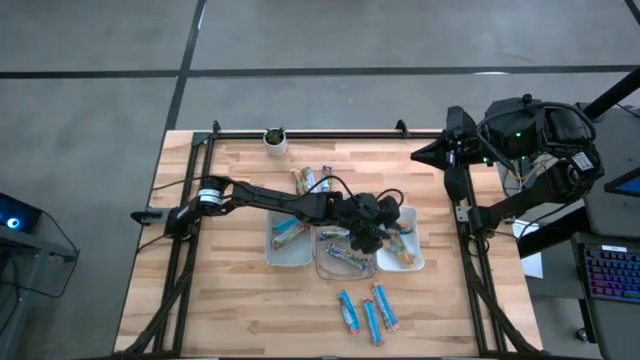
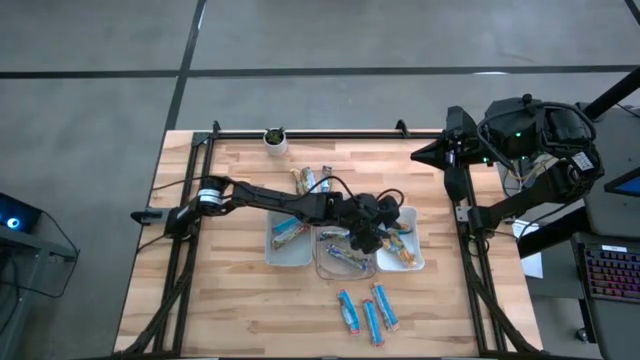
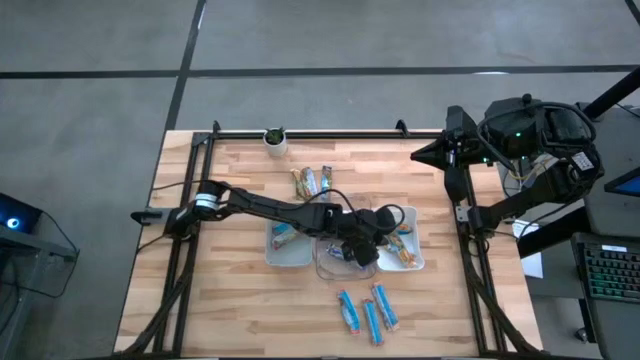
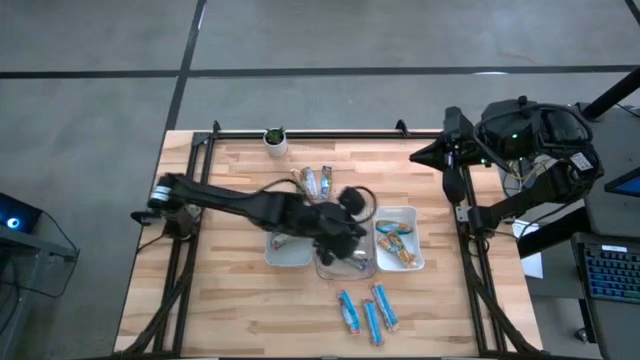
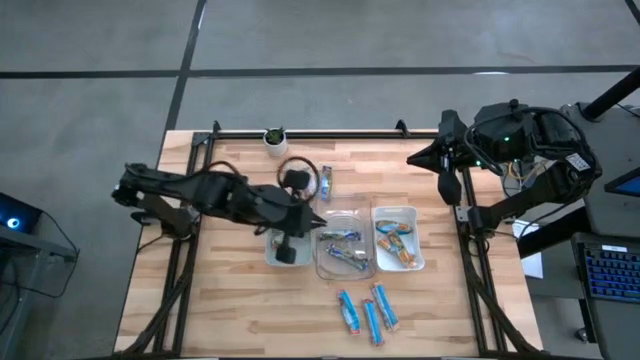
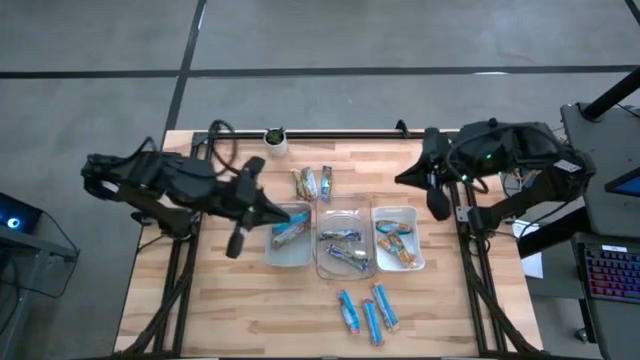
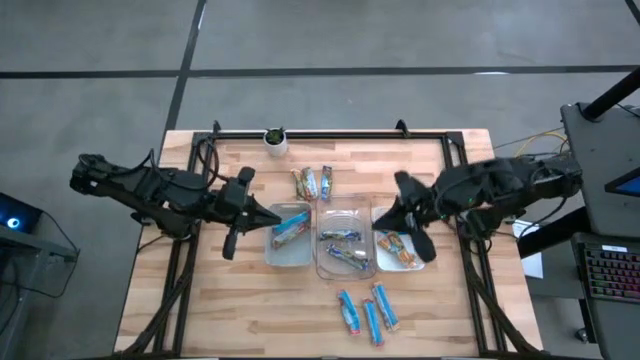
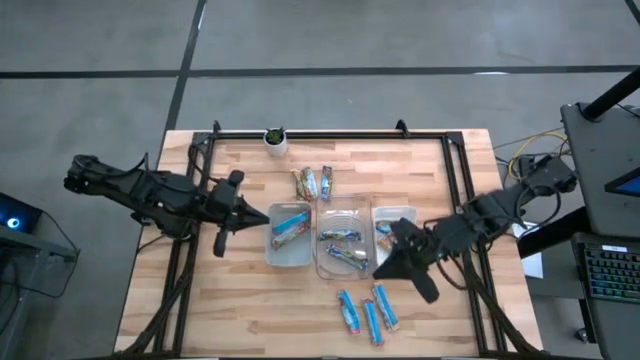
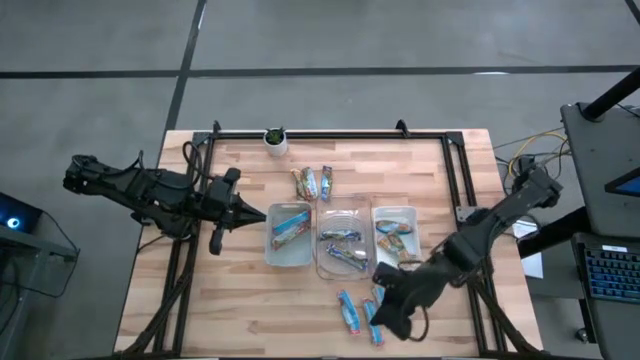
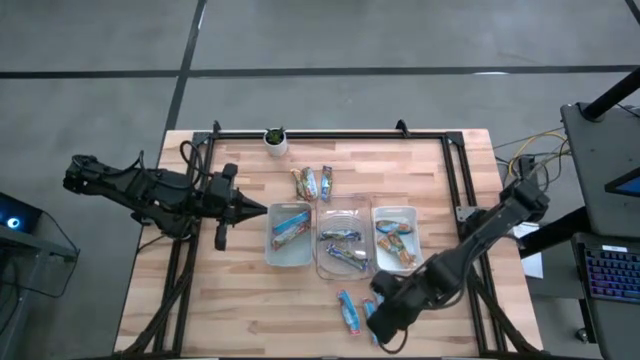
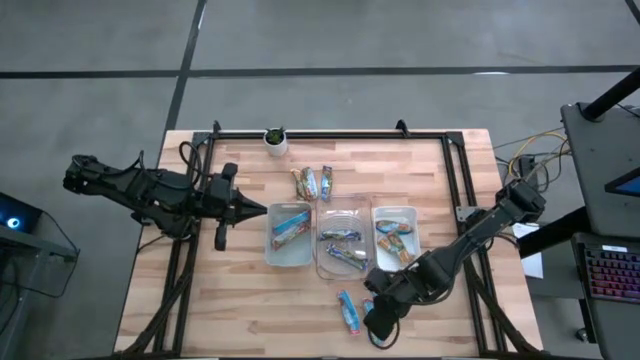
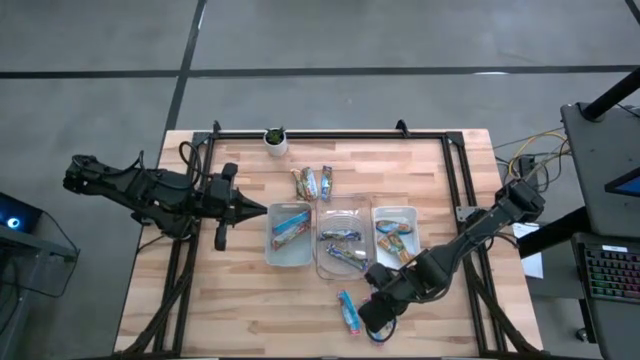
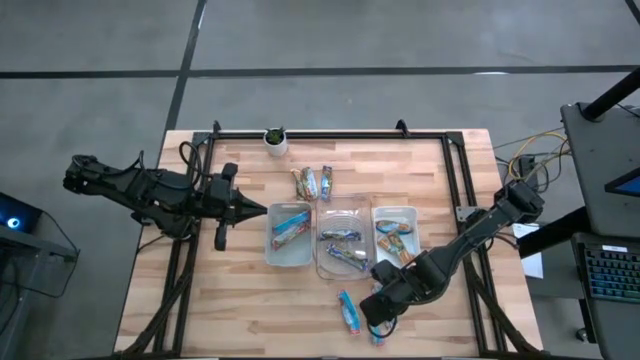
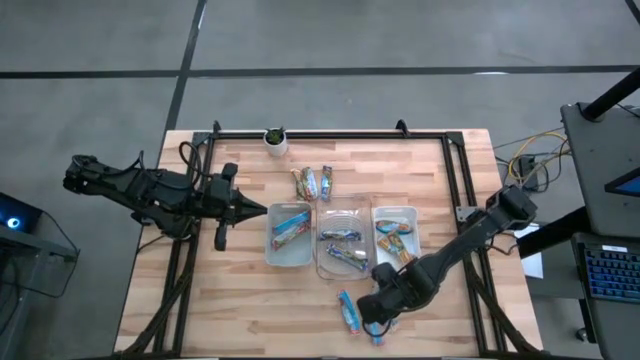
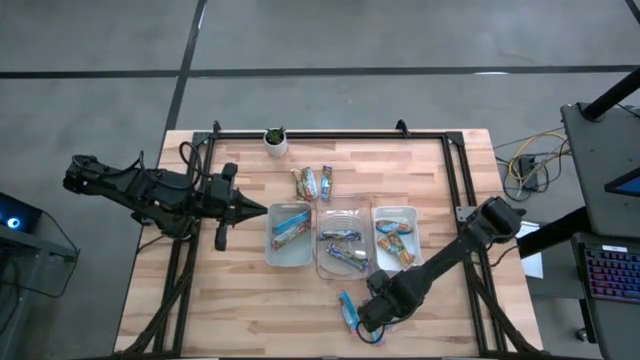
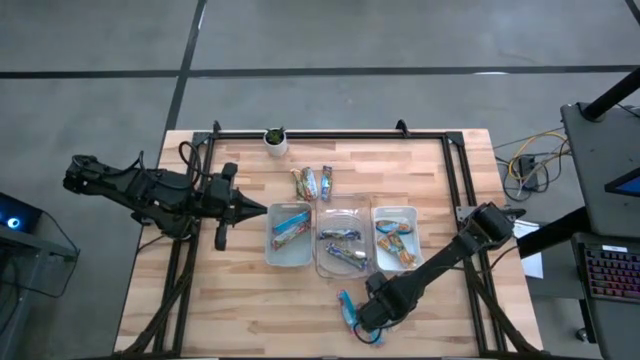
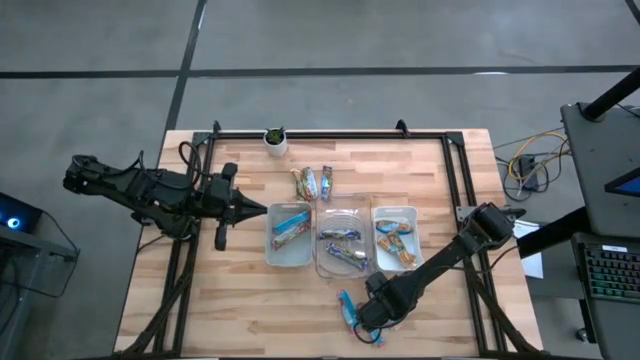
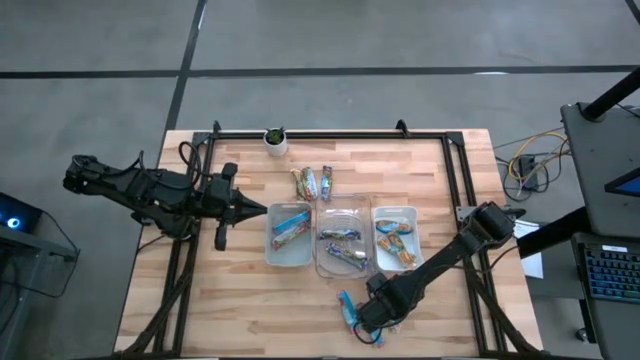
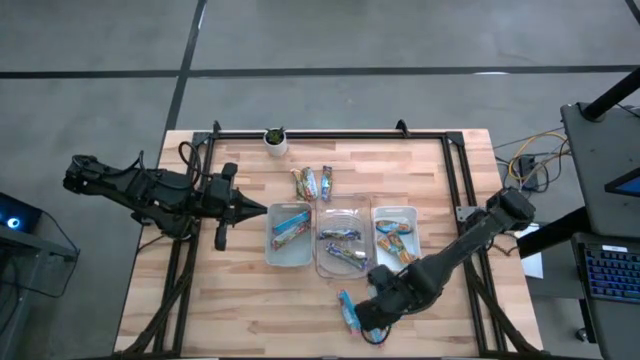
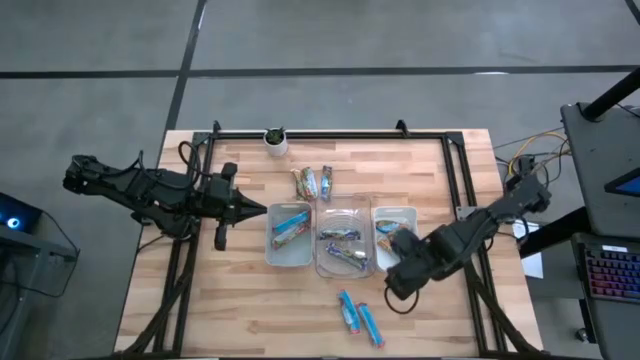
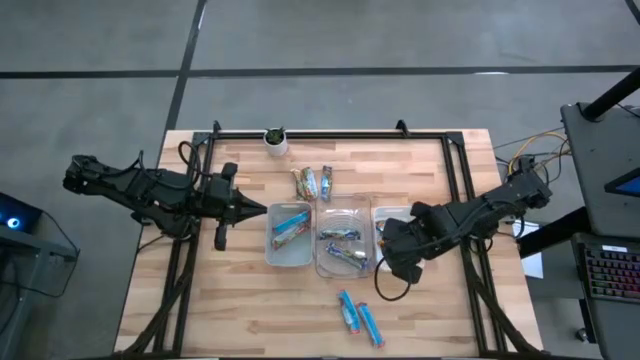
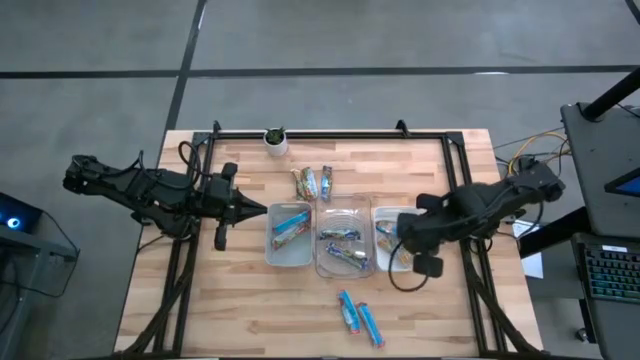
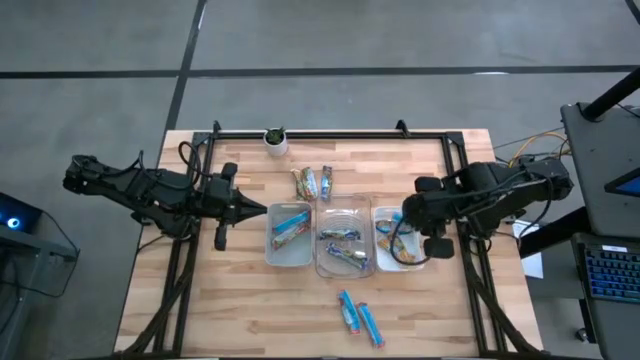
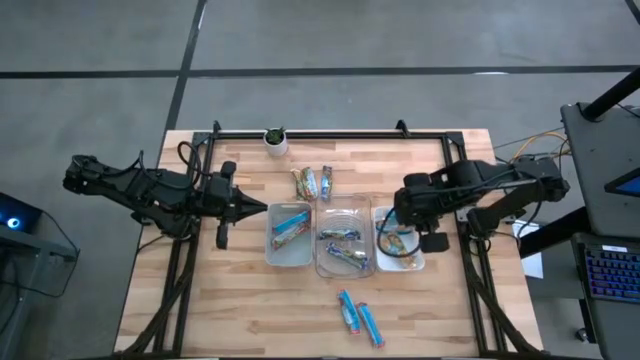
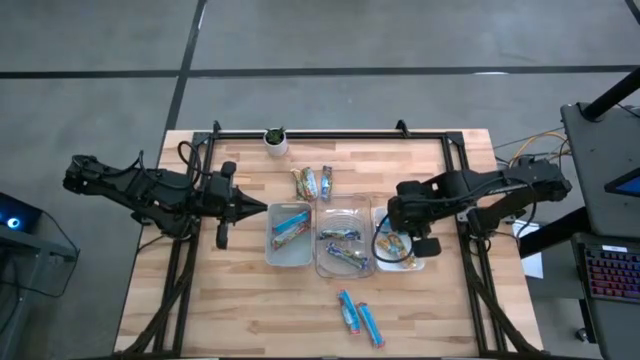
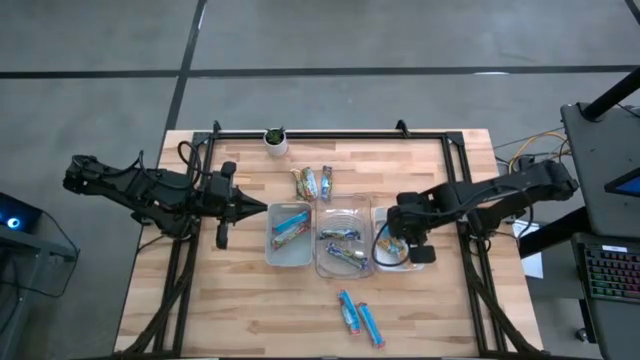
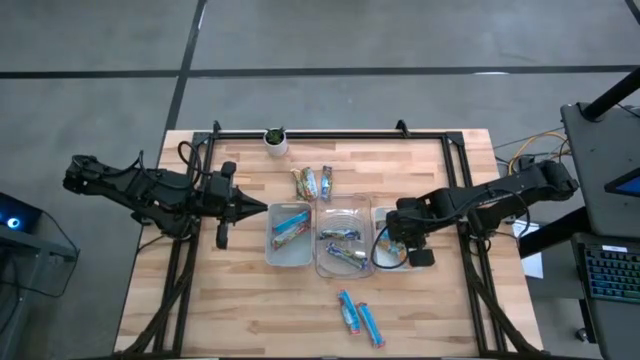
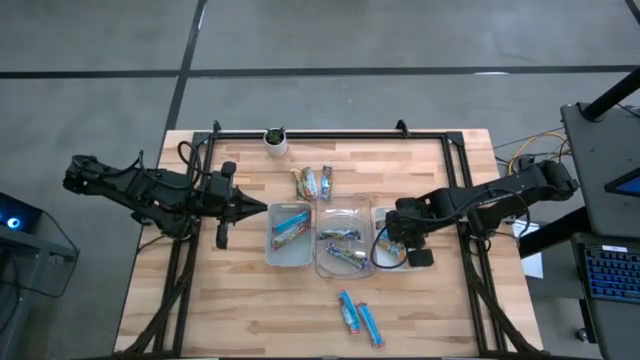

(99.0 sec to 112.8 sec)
Task: Pick and place Granola Bars by type
Put the right yellow granola bar into the white bin

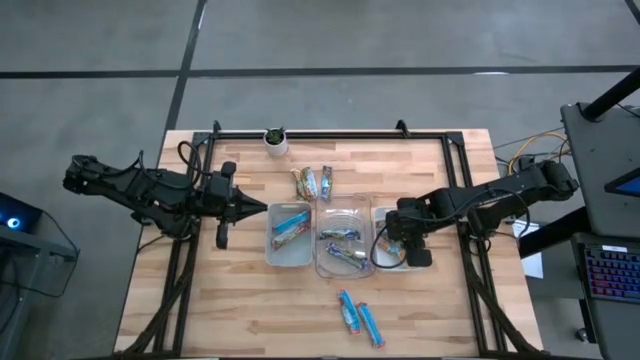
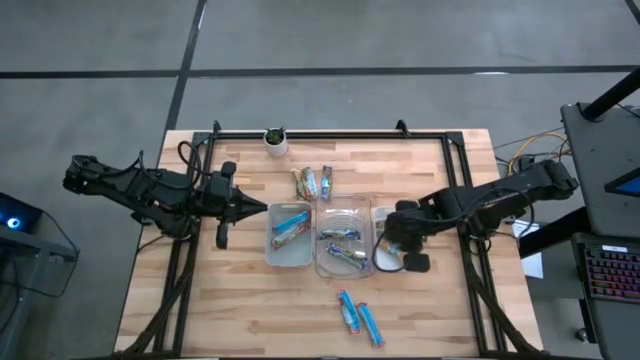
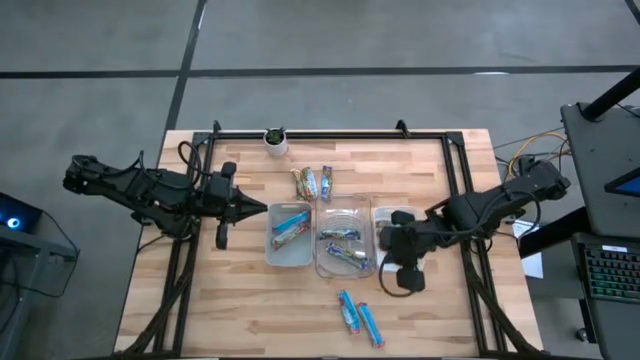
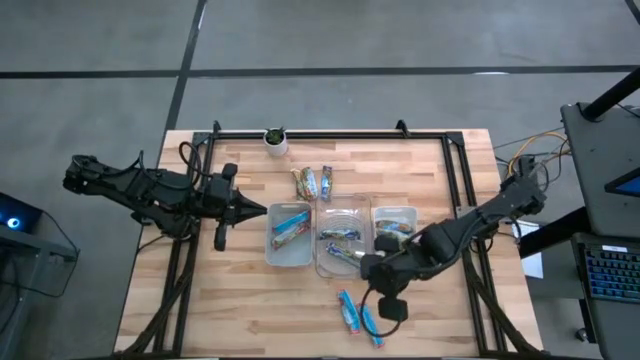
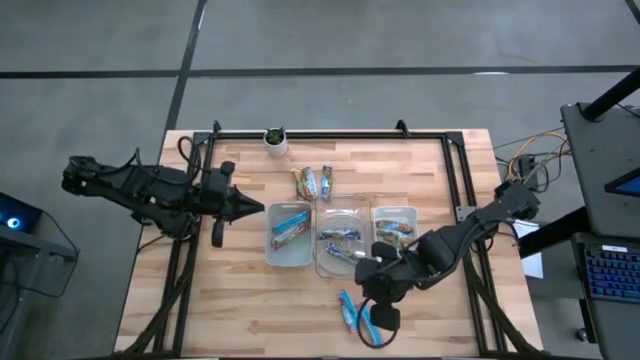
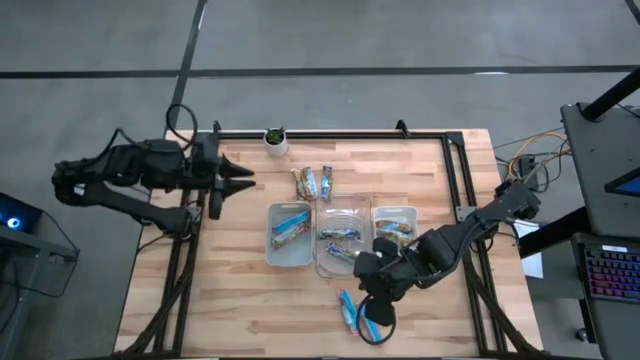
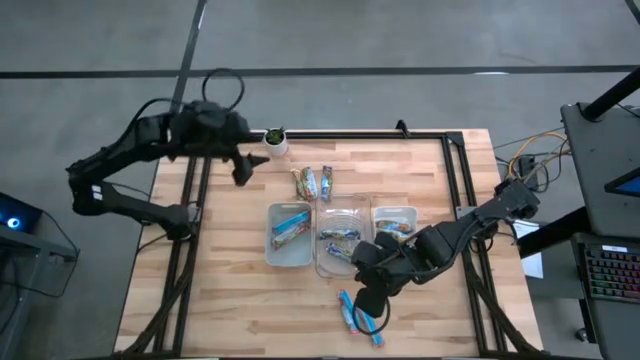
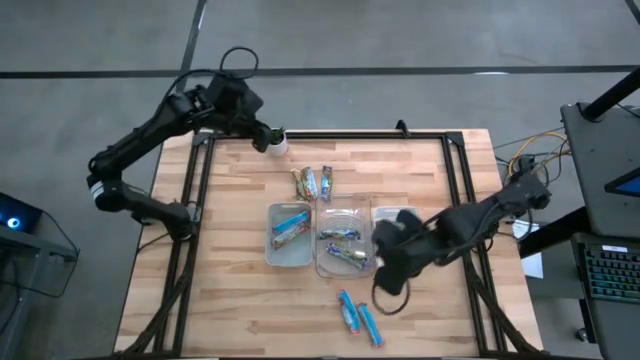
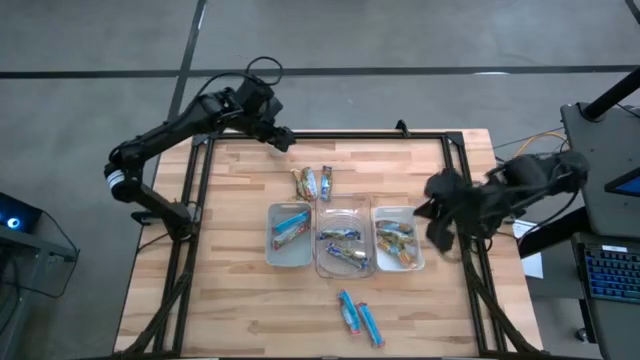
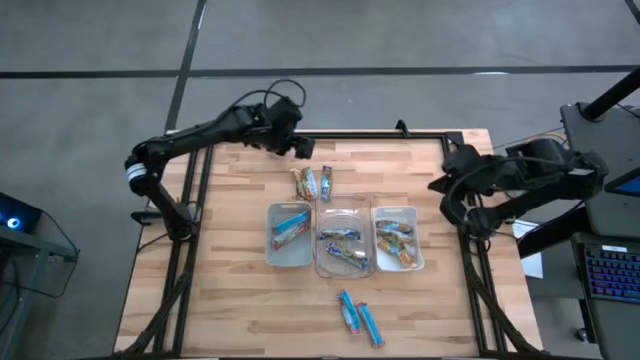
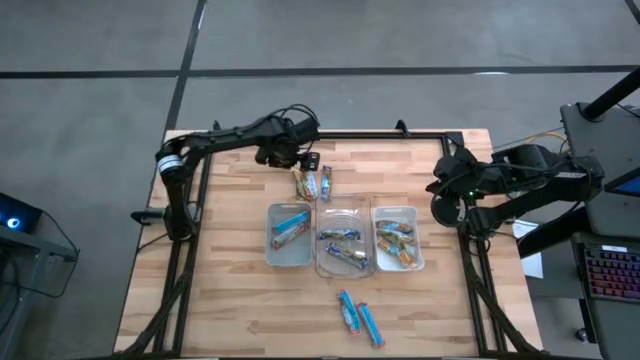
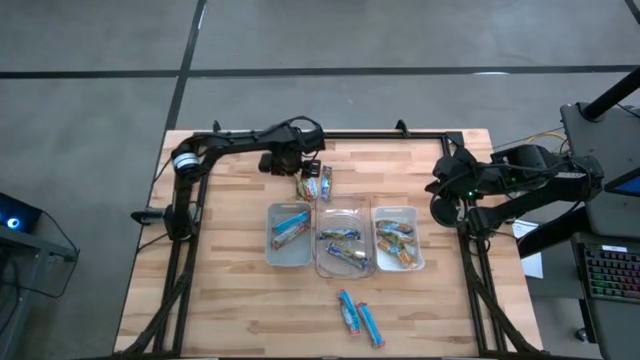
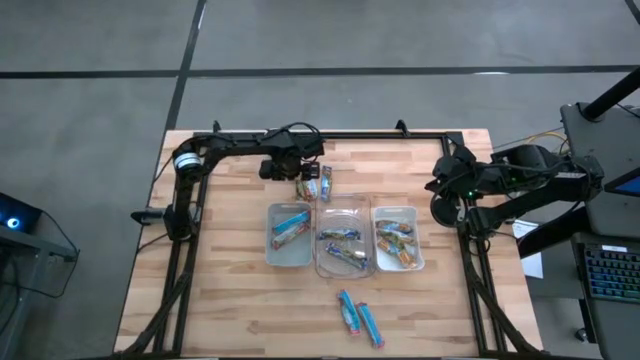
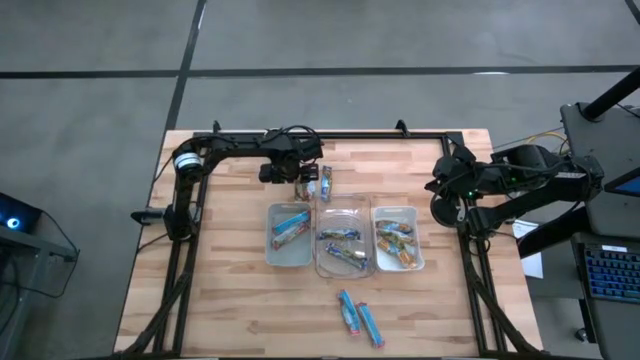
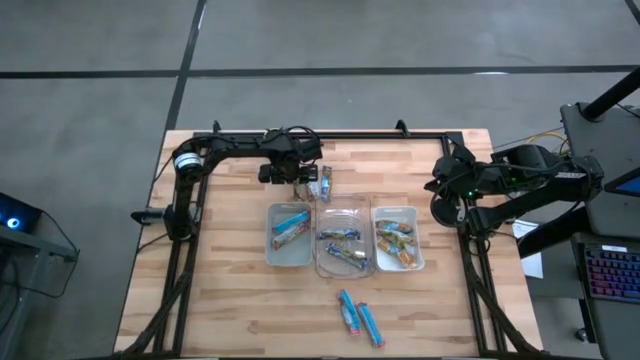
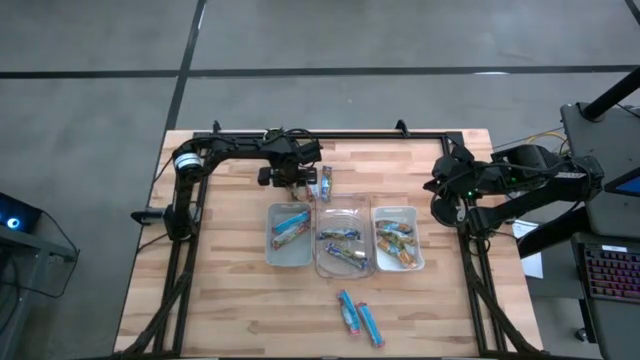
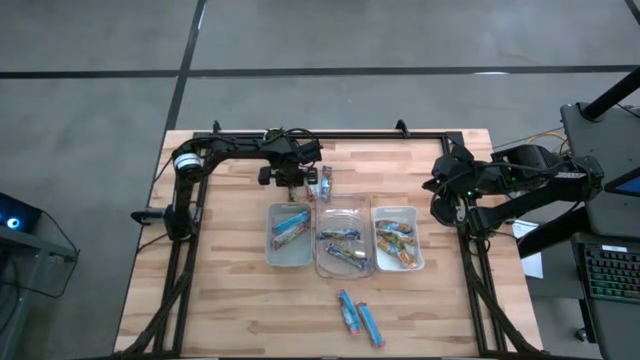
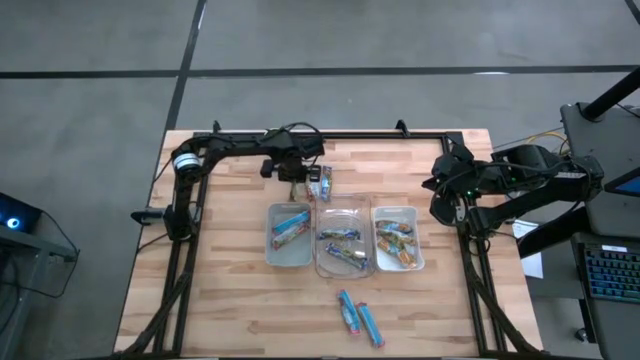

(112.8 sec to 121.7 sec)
Put the yellow granola bar into the white bin
